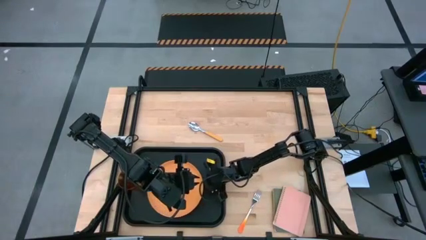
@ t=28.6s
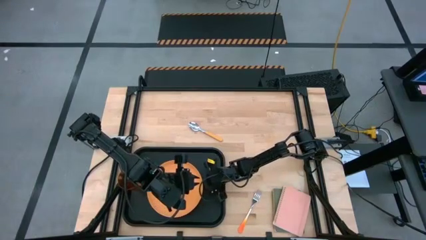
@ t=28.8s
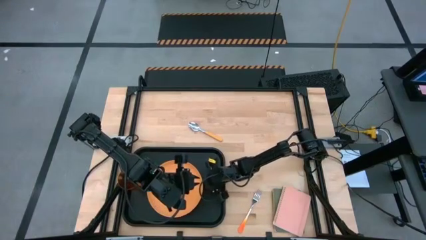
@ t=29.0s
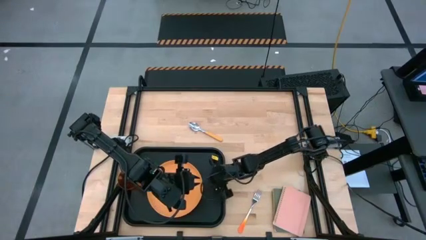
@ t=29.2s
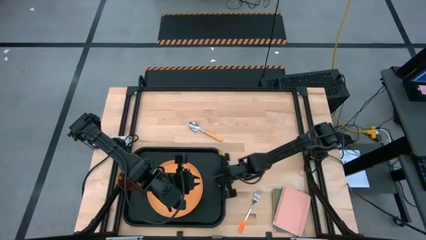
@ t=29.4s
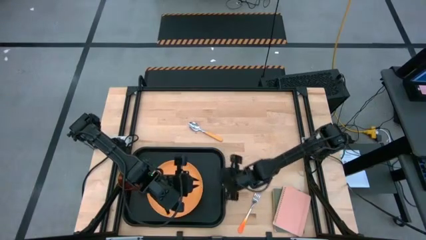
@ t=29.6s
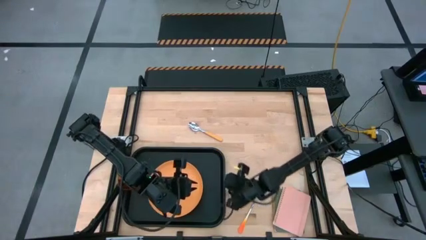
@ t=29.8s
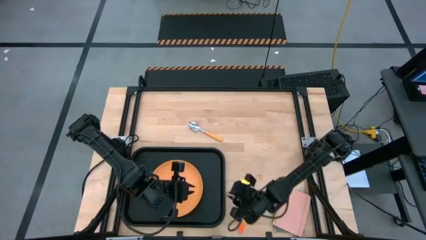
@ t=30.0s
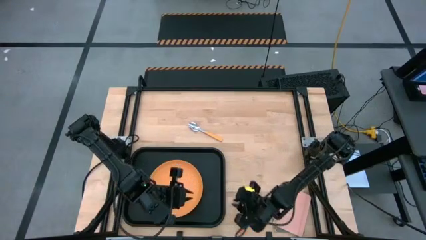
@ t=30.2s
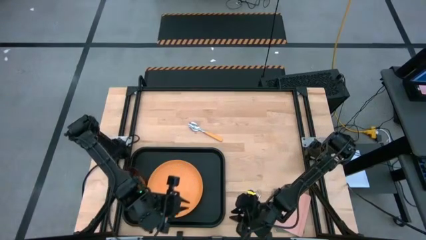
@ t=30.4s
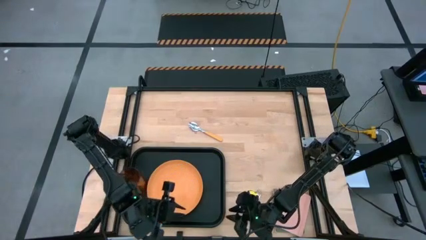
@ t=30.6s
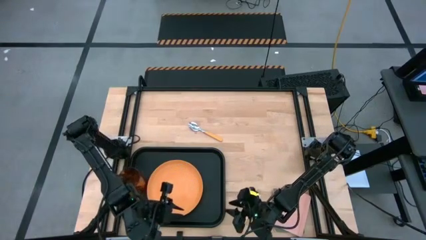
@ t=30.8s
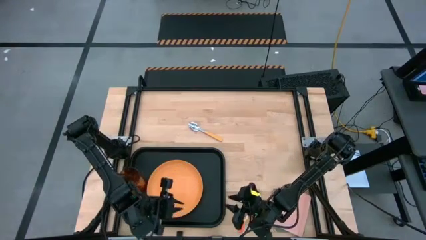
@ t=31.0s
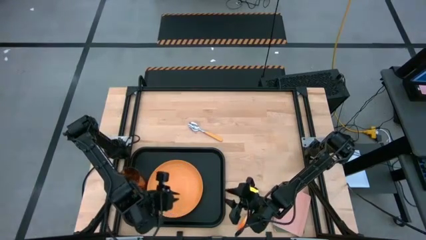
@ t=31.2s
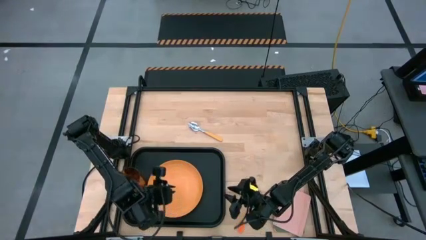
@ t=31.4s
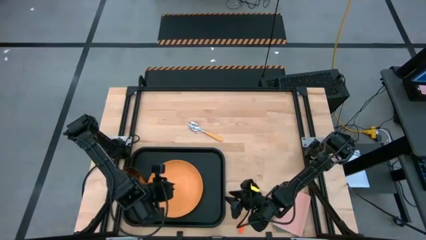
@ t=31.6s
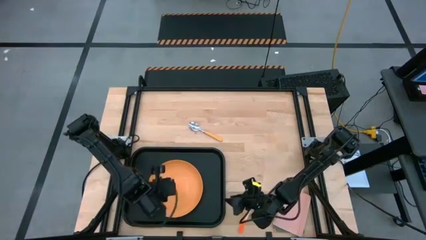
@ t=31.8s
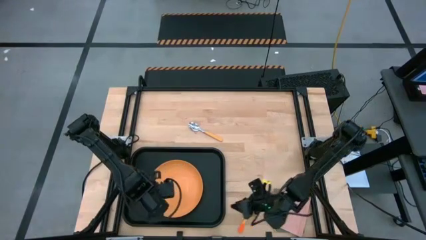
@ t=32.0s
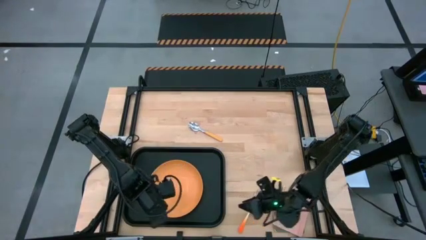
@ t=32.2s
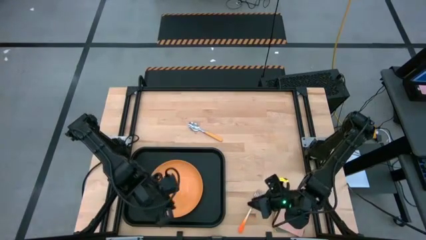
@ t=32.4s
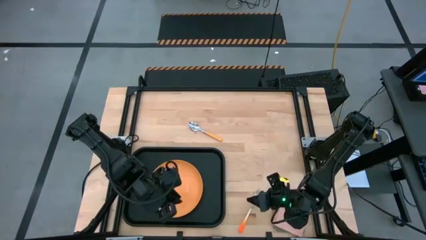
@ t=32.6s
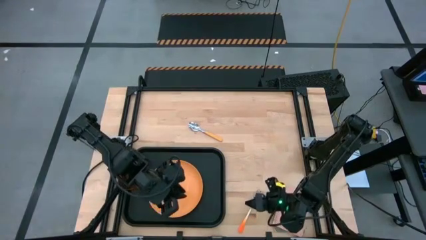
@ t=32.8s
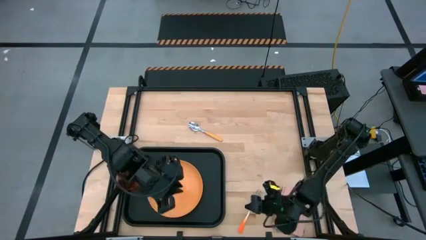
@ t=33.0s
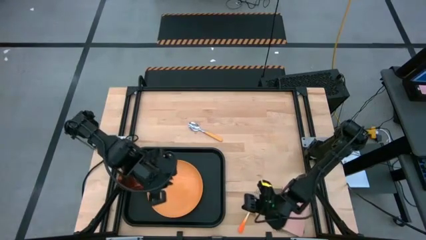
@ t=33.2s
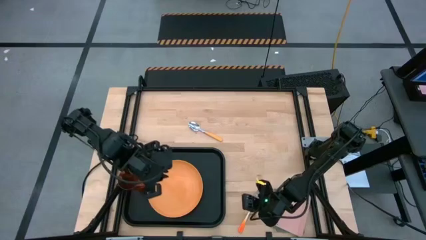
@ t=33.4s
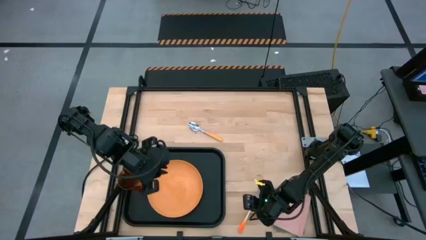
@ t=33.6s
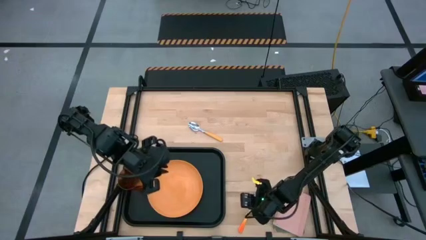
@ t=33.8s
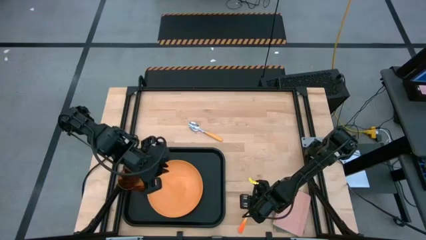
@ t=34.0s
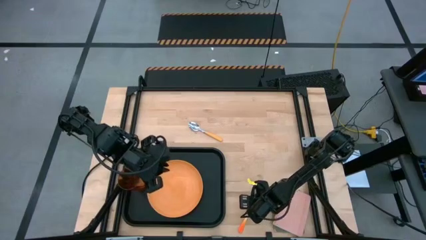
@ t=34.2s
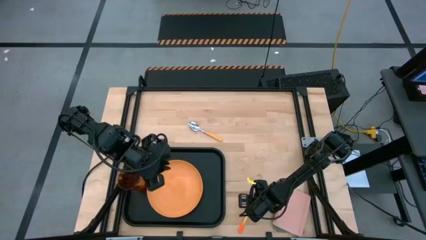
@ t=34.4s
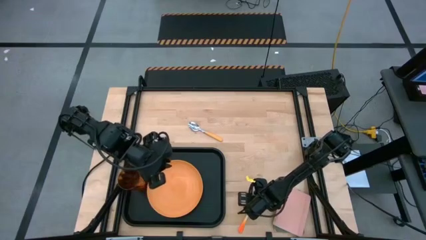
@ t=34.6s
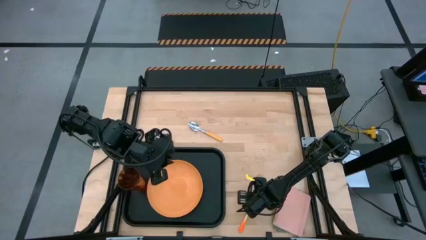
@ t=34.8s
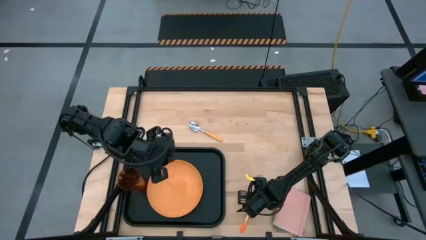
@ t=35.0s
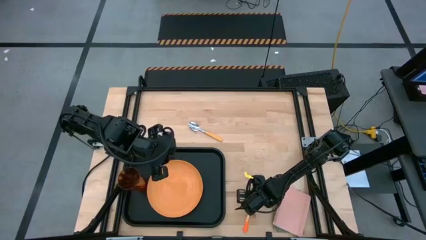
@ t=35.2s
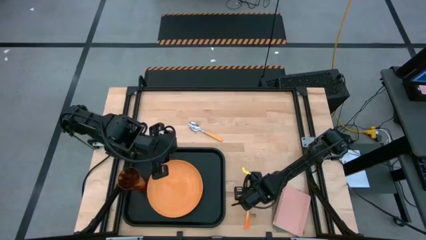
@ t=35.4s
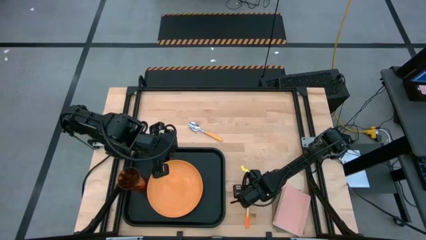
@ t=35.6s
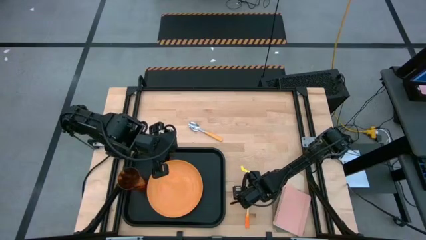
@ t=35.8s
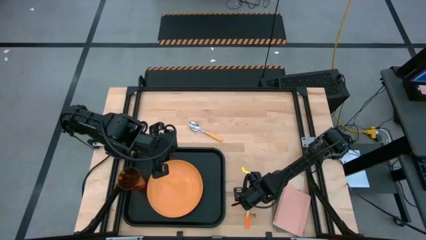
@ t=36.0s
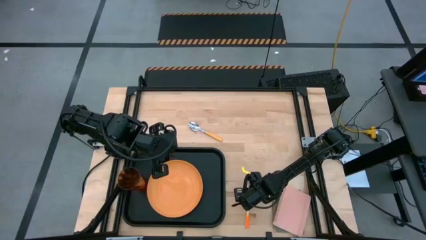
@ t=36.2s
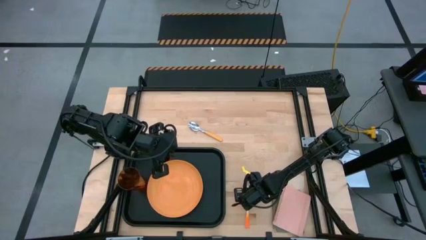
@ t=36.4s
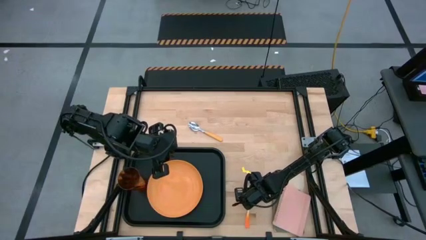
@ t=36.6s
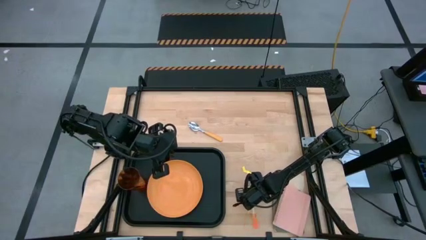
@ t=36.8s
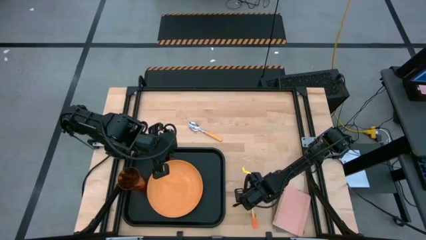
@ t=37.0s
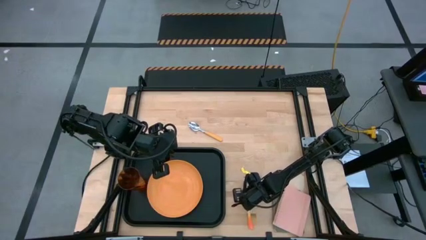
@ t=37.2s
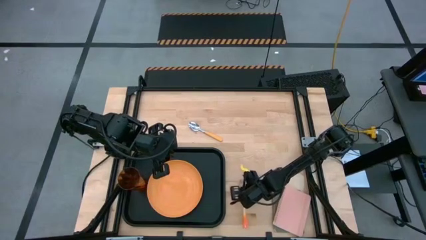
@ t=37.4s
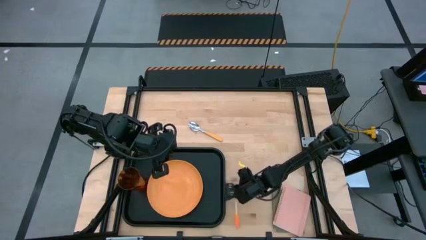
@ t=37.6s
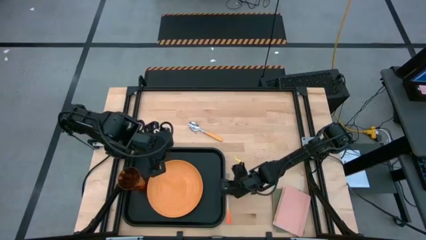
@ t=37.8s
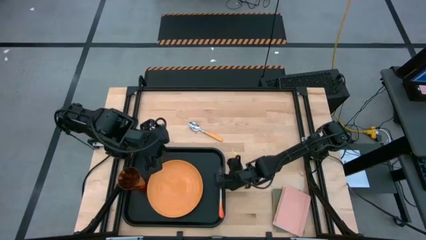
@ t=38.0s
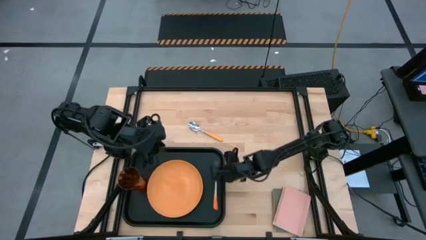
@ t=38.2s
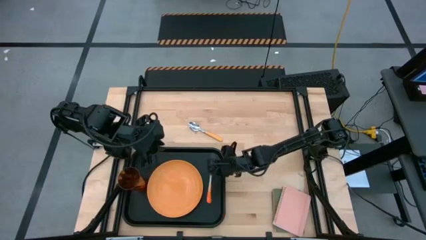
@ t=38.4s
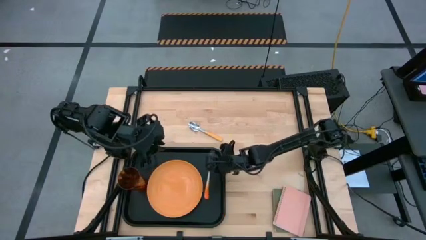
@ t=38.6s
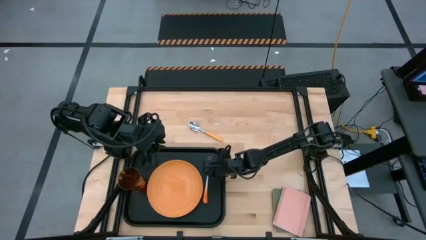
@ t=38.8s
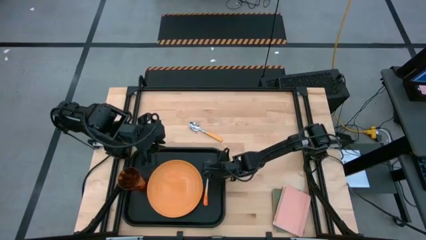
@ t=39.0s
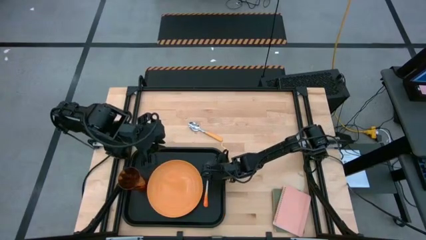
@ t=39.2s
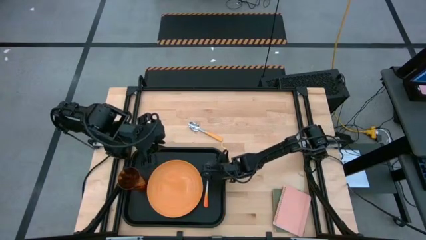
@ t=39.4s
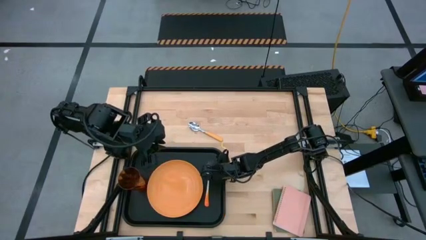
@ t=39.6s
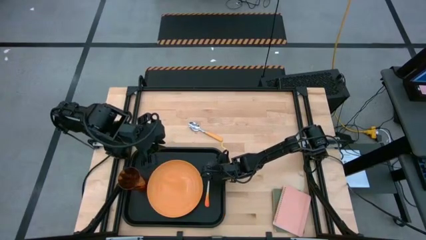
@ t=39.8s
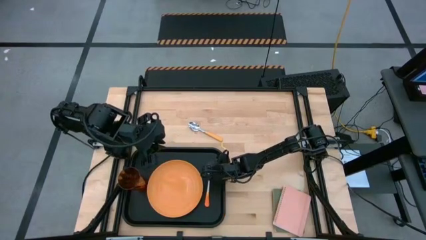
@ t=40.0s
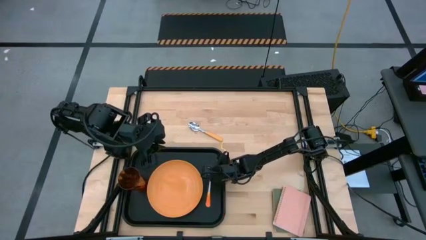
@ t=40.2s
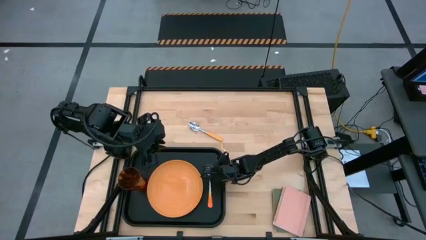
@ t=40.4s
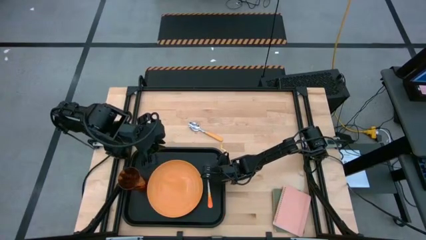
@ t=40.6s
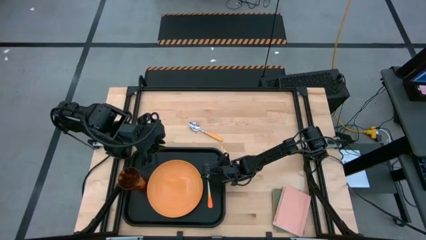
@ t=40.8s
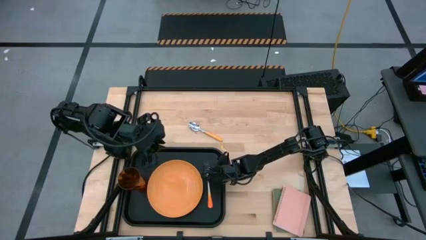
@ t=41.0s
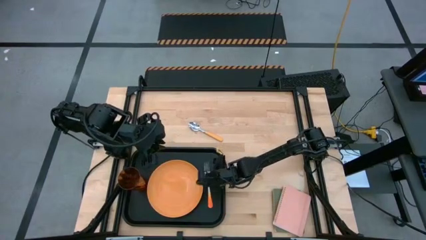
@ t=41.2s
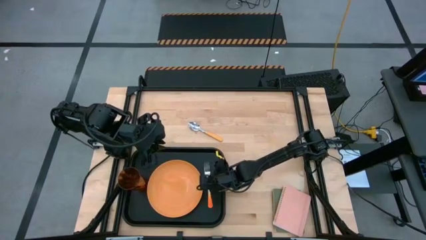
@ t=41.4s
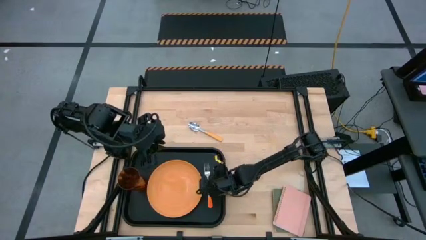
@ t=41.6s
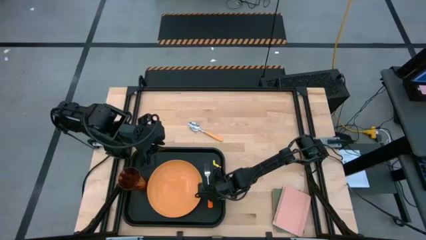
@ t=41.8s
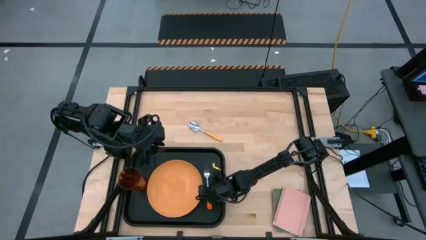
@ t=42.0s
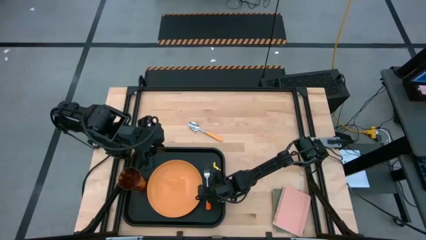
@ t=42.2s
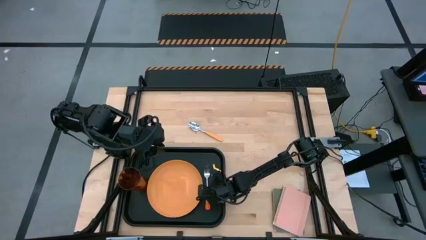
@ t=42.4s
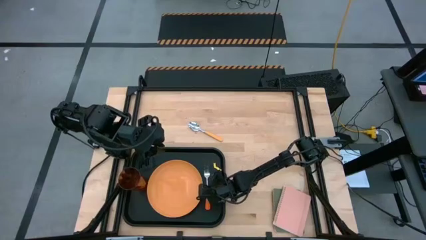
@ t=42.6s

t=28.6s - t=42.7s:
Task: Pick and place plate/cup/fork/spoon on tray
Put the orange fork on the black tray to the right of the orange plate
